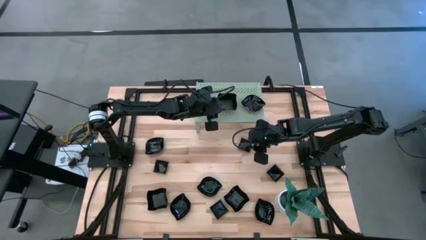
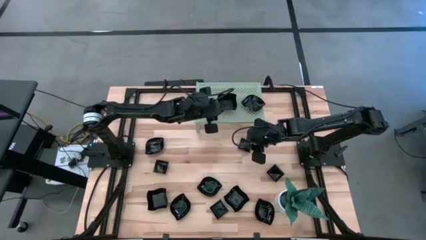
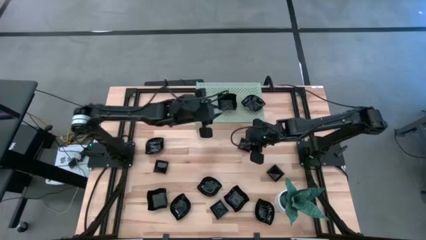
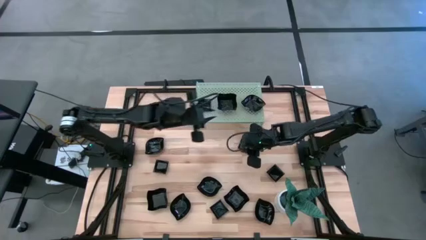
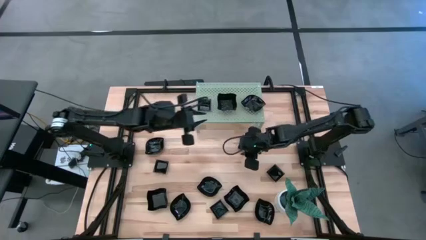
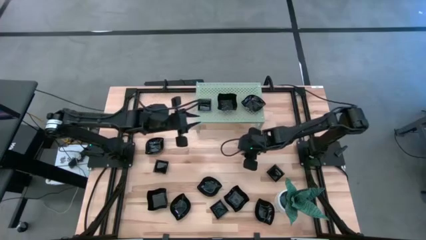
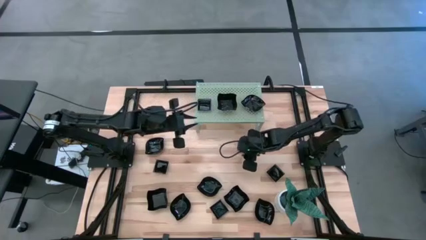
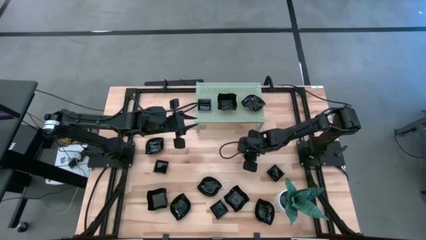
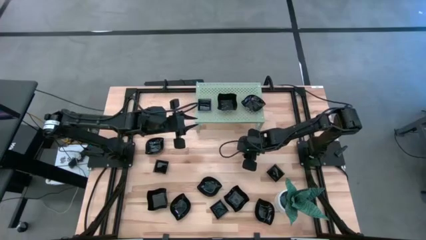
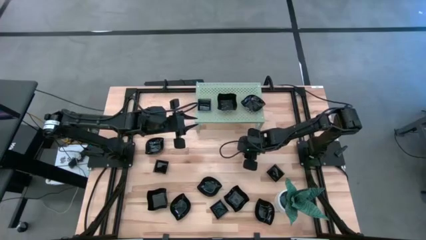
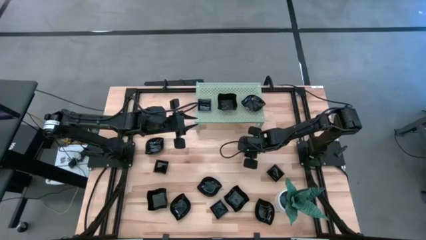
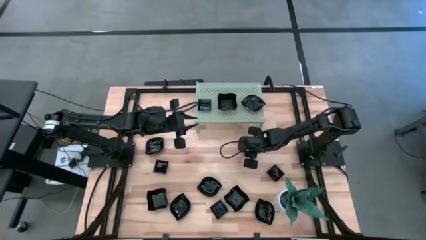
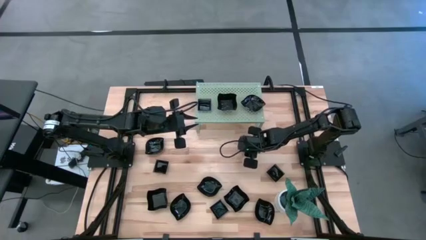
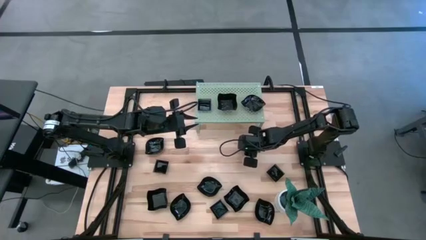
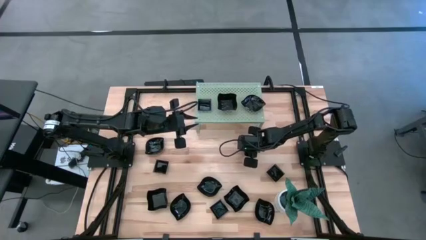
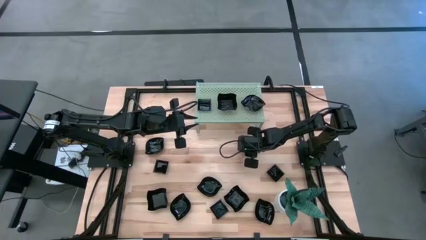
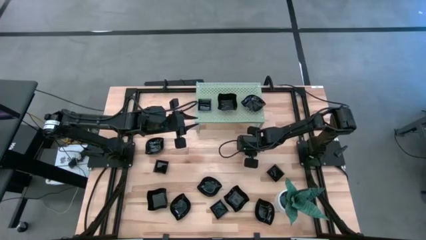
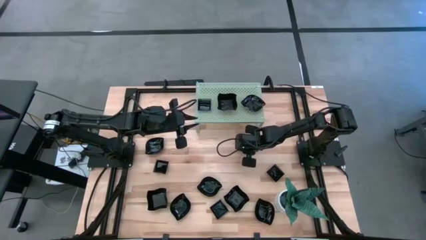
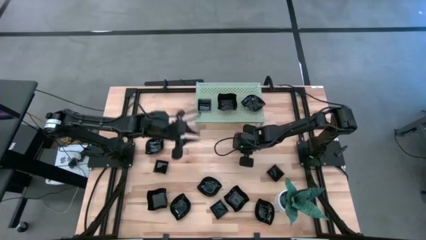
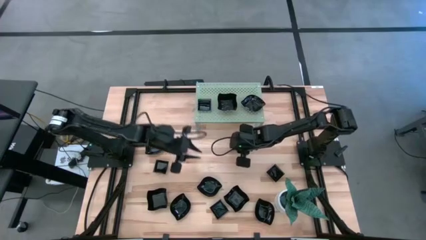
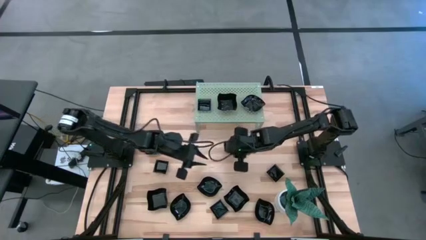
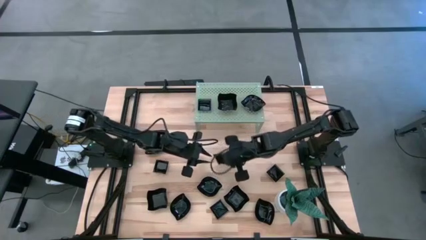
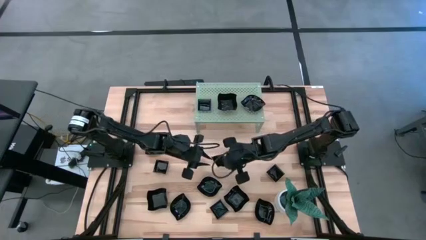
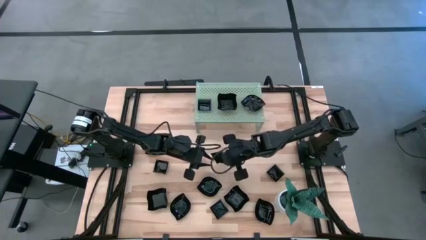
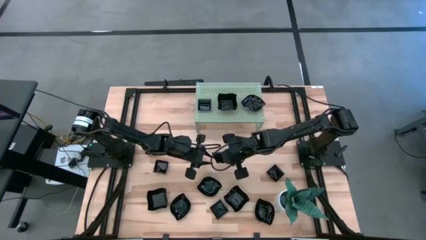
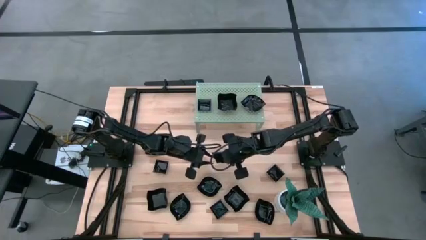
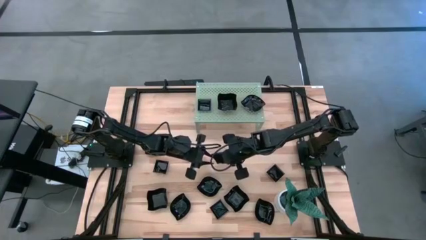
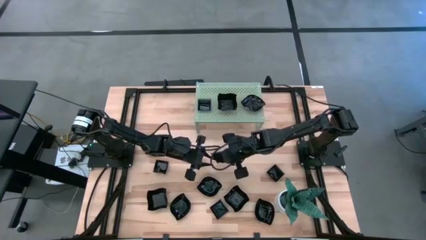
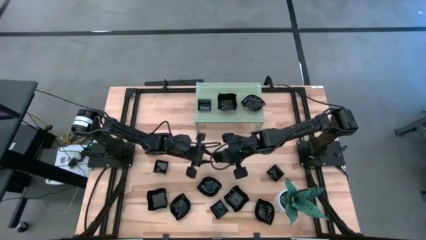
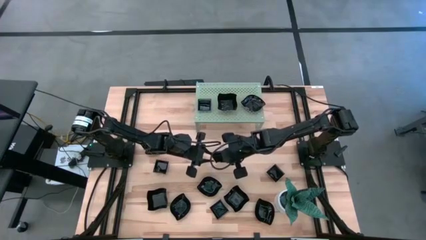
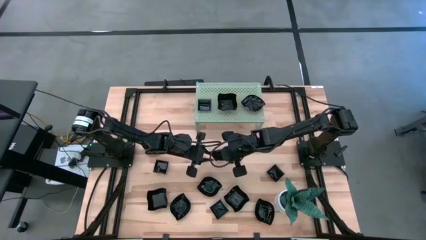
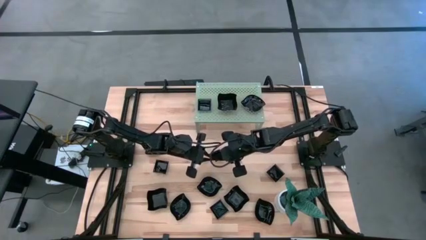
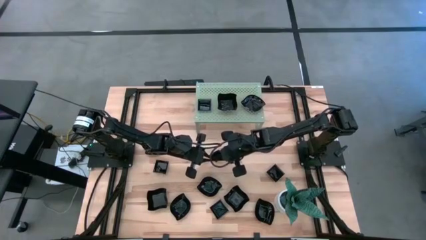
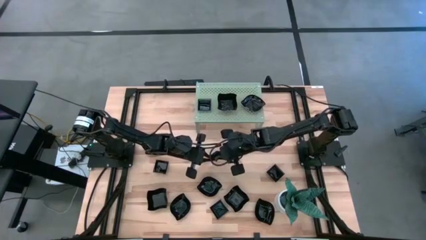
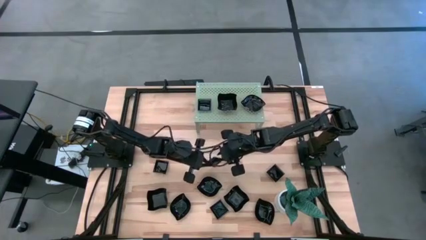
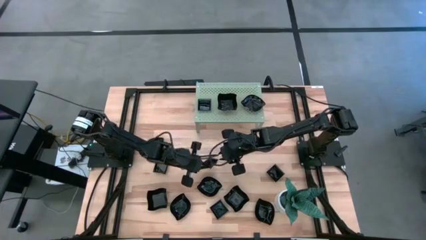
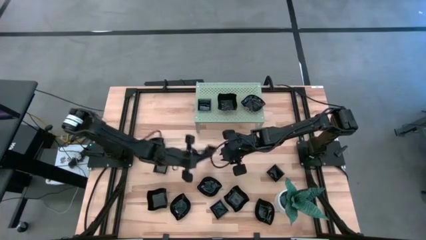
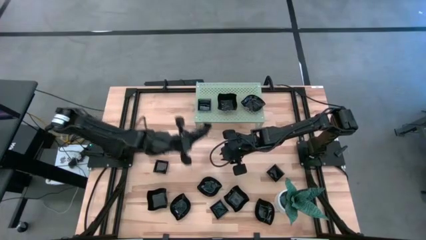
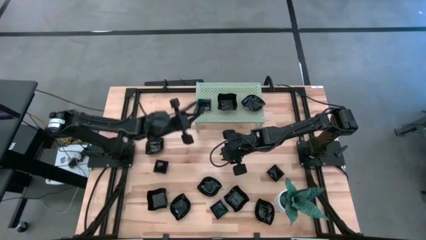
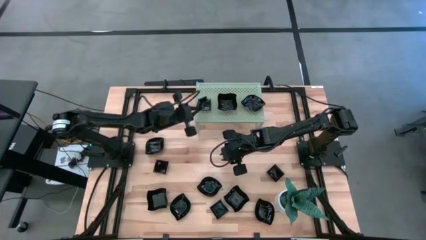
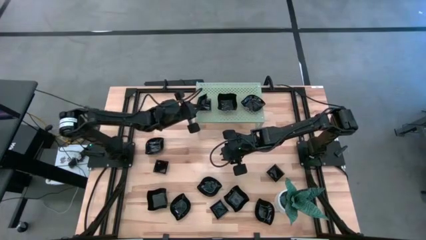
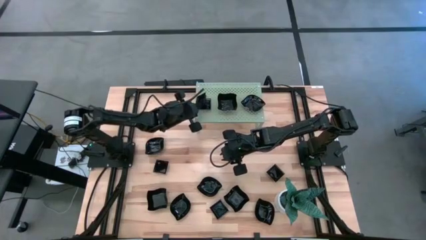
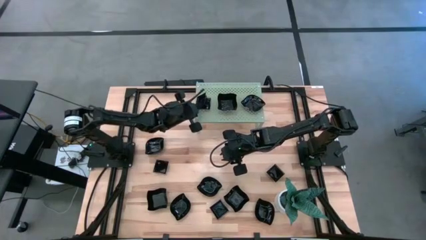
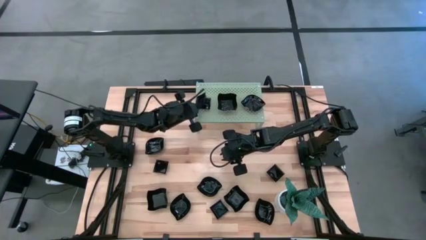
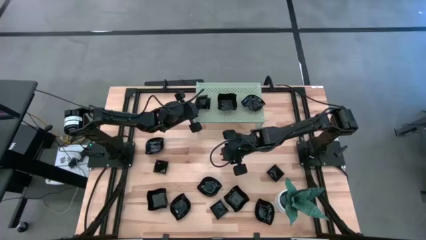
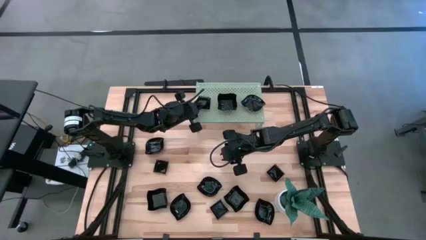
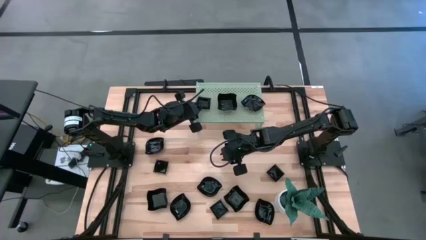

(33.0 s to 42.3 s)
Task: Pick & Place Mini shaped plates
Stack the square plate on top of the other square plate on the shelf

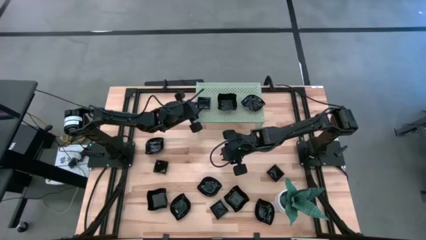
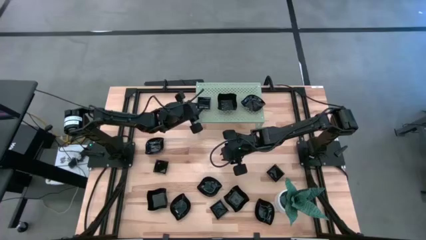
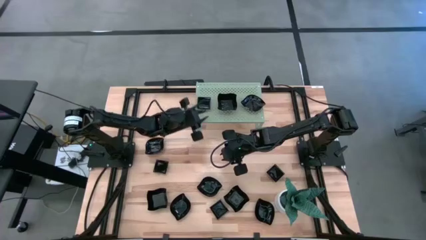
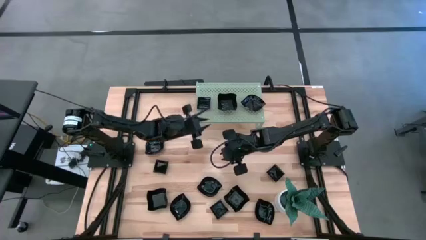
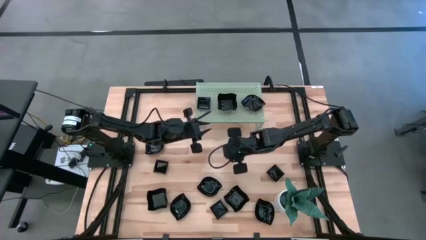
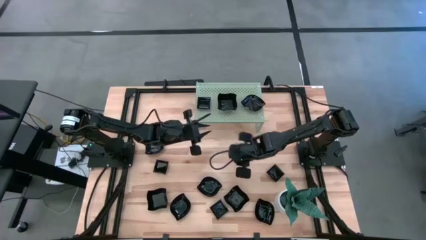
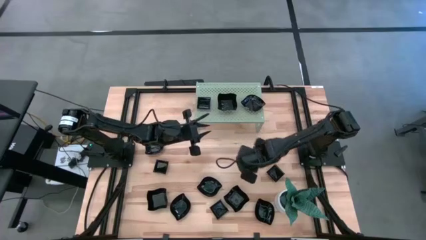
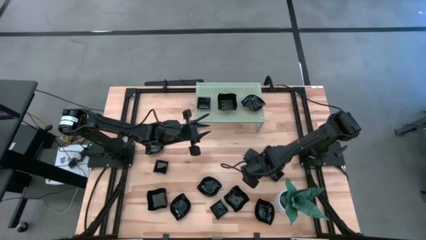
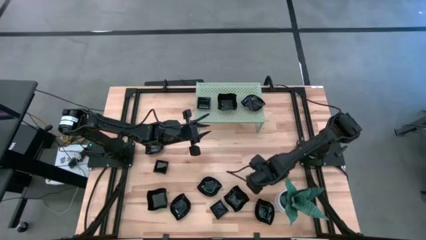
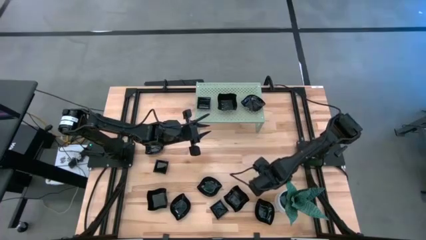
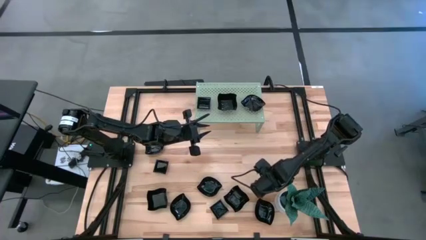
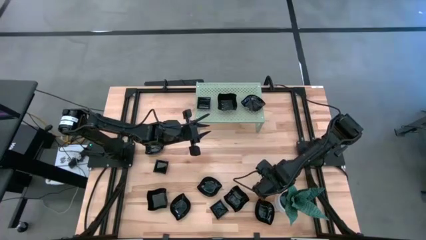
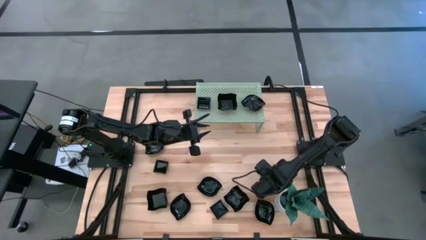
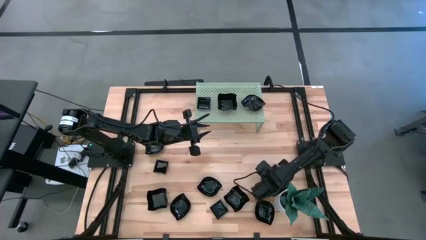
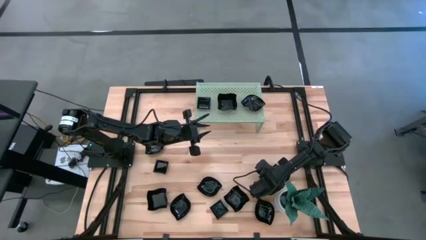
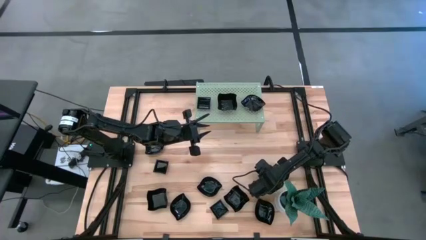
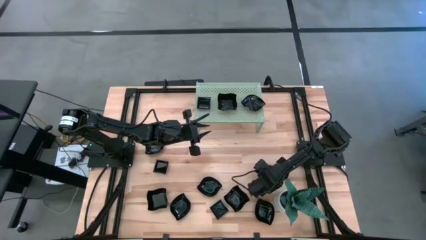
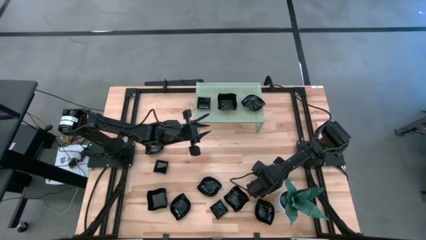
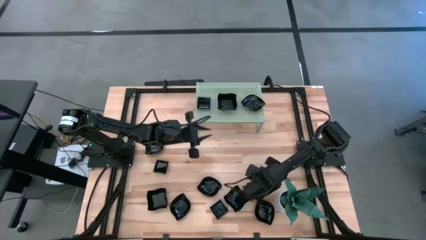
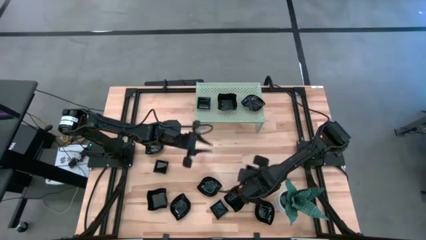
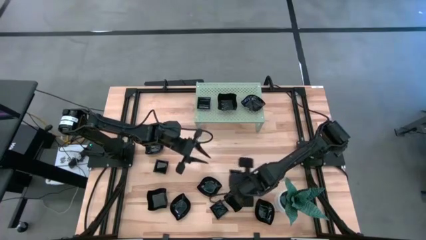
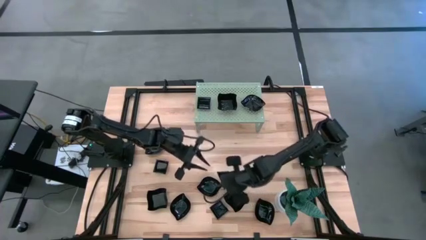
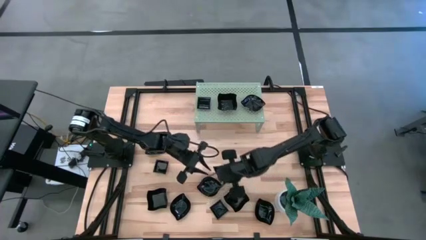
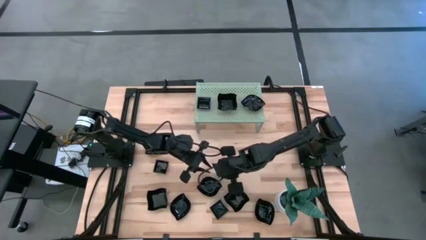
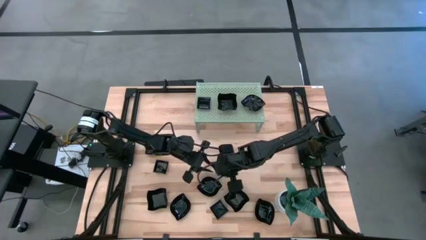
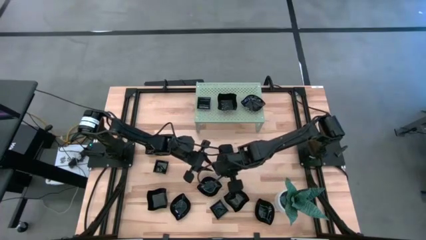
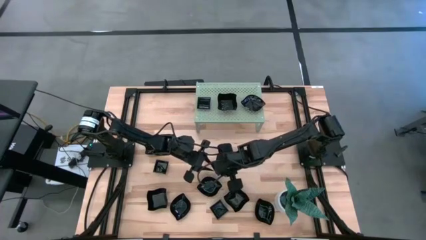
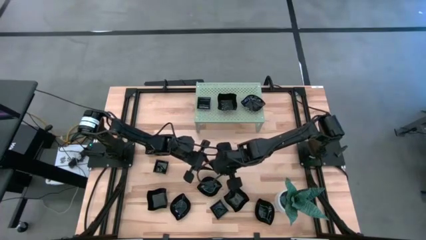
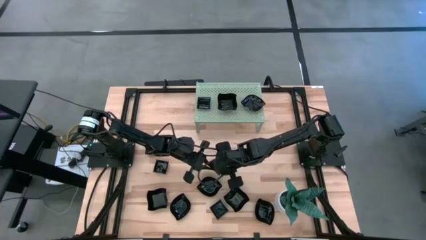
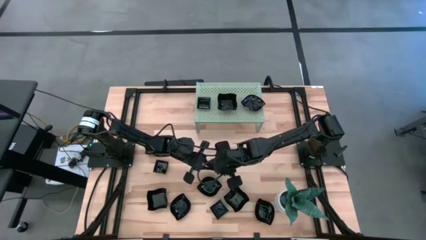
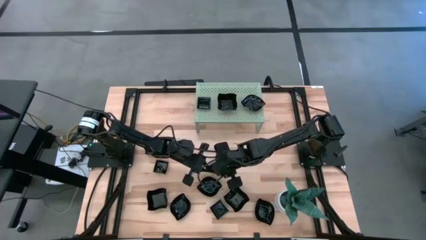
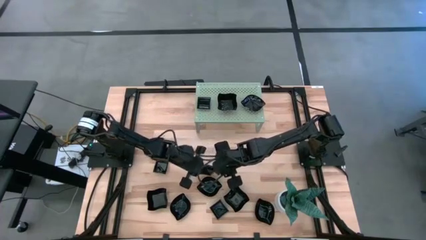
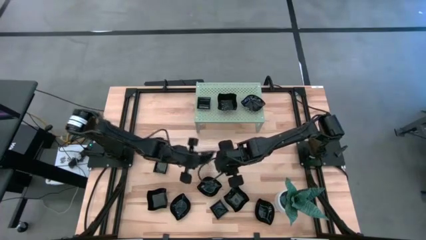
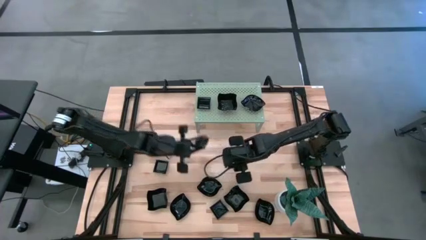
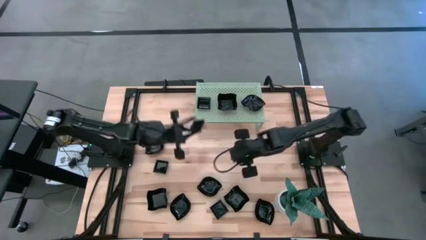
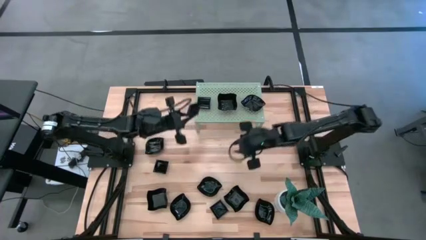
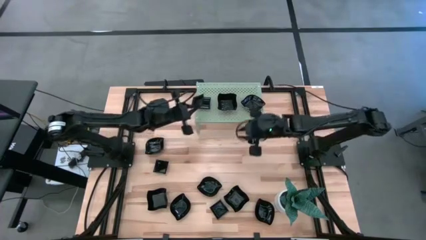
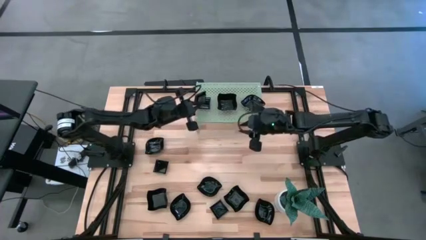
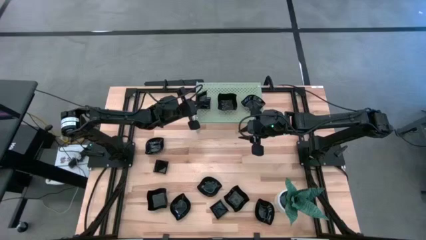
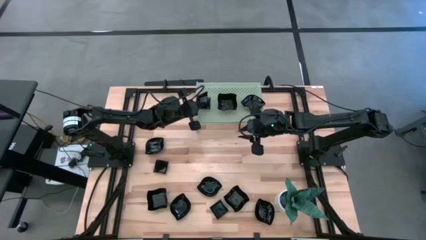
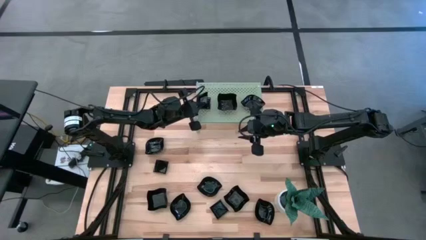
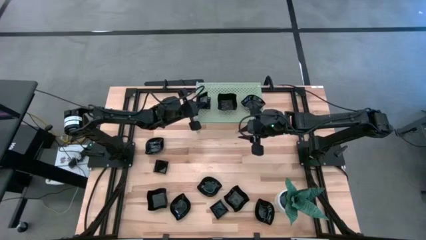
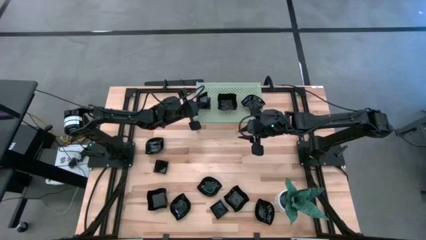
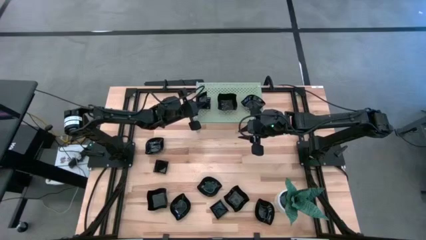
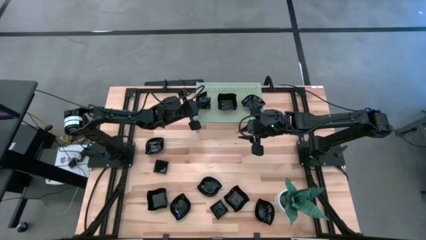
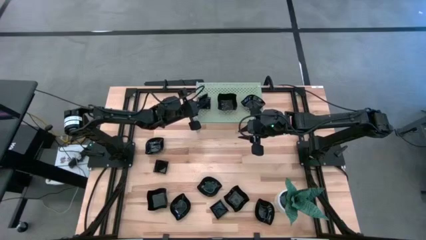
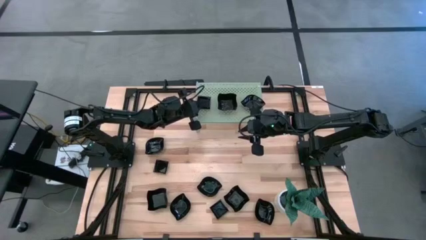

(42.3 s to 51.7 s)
Stack the square plate on top of the other square plate on the shelf
